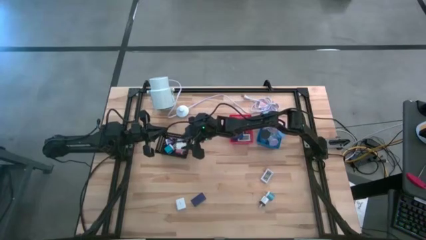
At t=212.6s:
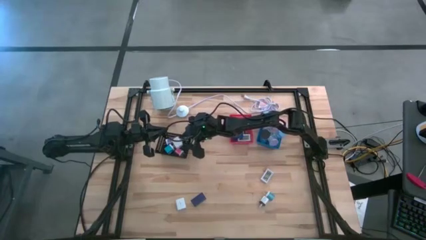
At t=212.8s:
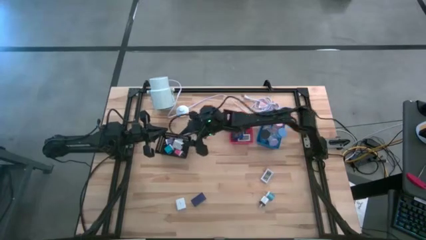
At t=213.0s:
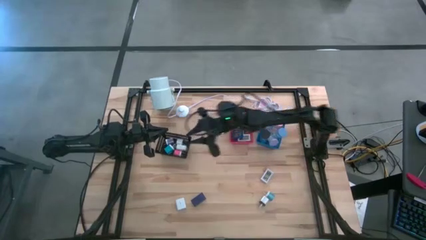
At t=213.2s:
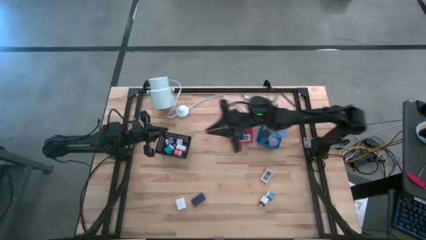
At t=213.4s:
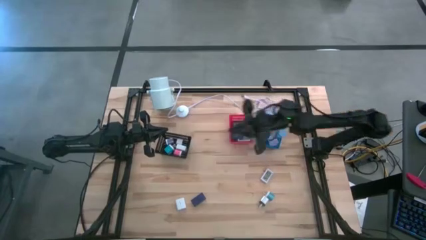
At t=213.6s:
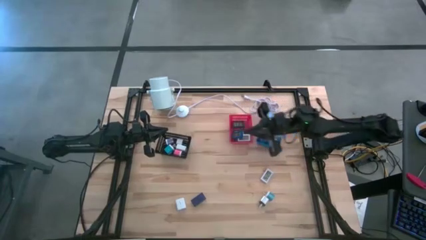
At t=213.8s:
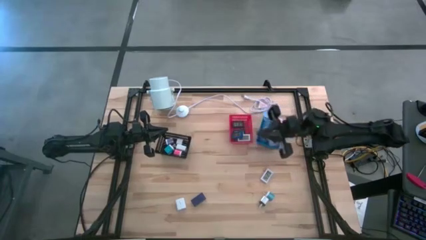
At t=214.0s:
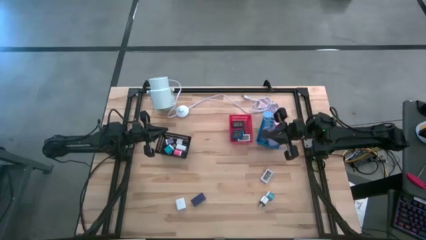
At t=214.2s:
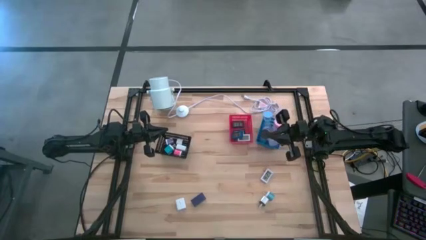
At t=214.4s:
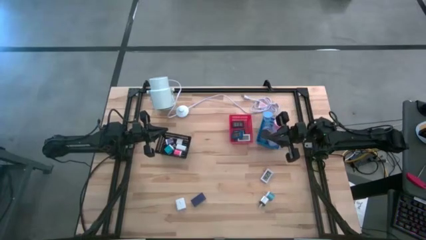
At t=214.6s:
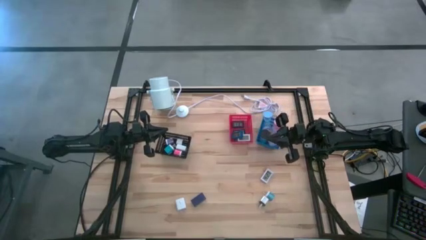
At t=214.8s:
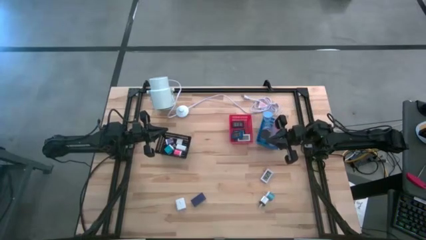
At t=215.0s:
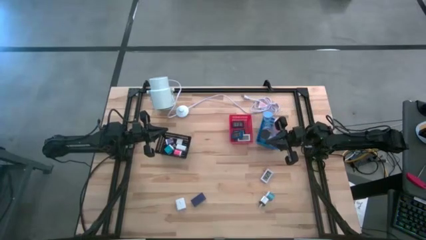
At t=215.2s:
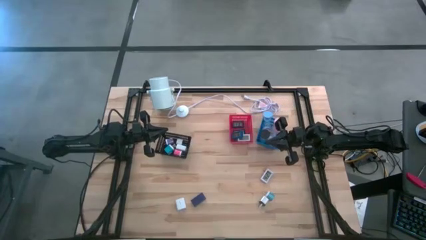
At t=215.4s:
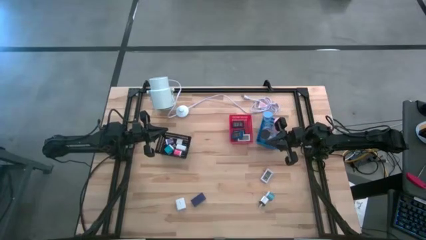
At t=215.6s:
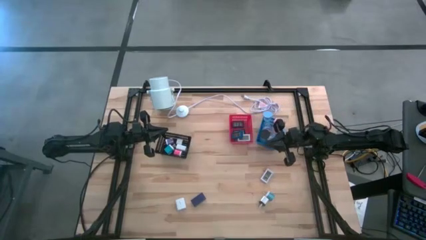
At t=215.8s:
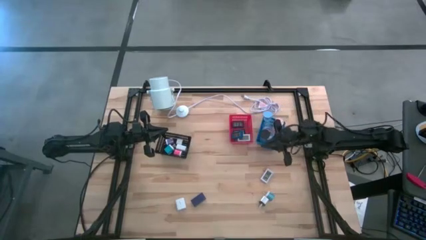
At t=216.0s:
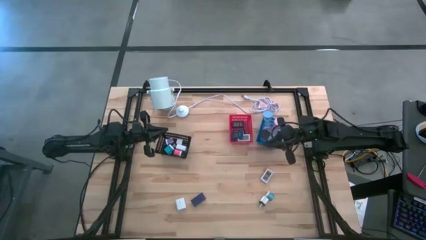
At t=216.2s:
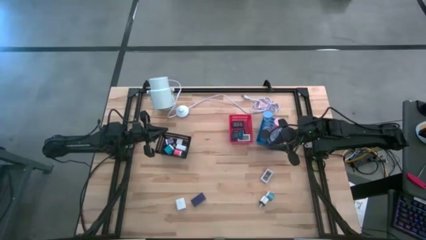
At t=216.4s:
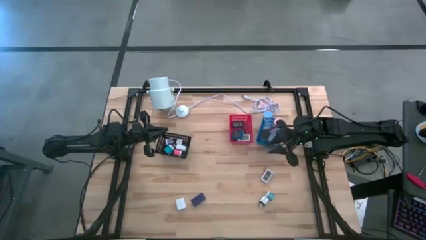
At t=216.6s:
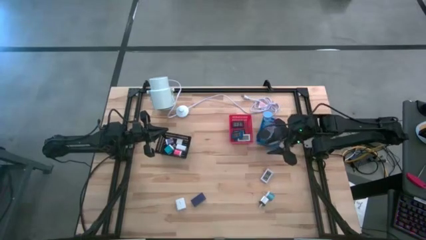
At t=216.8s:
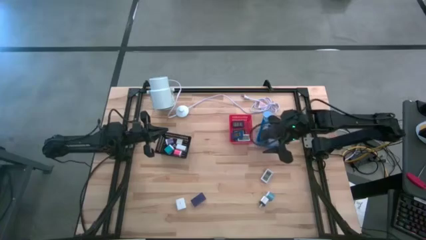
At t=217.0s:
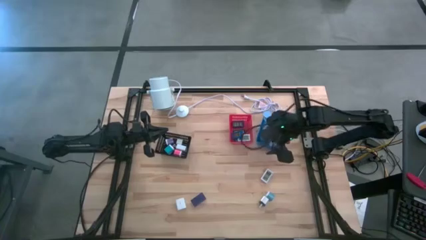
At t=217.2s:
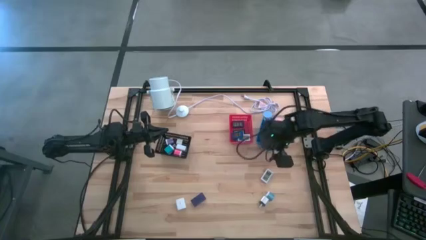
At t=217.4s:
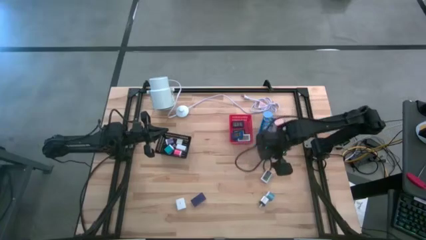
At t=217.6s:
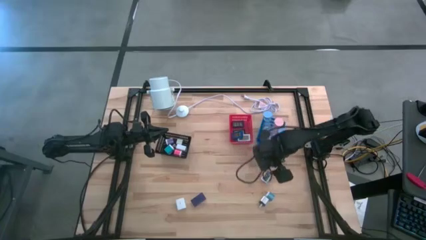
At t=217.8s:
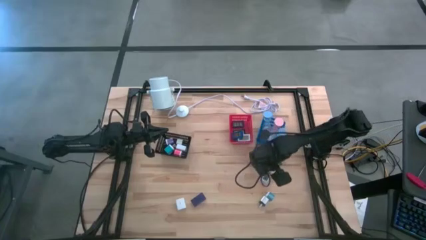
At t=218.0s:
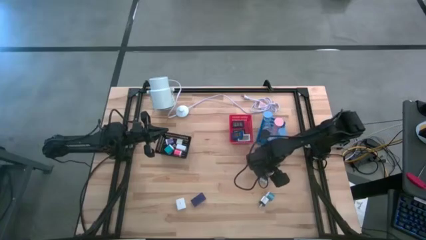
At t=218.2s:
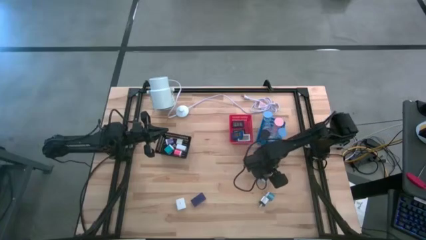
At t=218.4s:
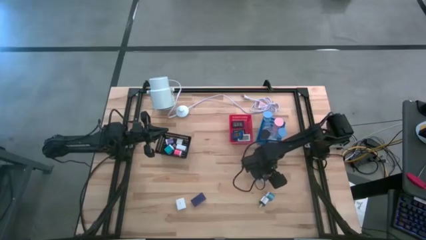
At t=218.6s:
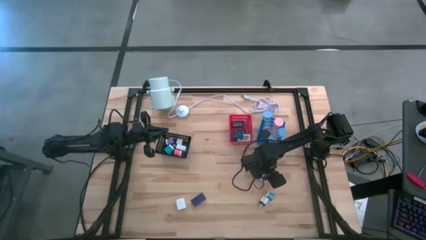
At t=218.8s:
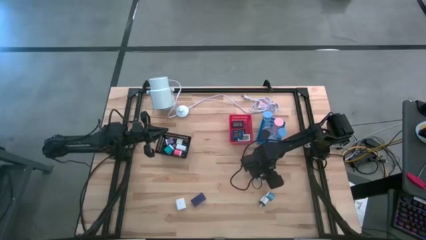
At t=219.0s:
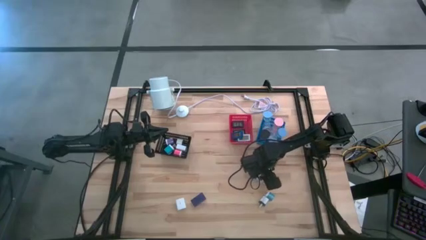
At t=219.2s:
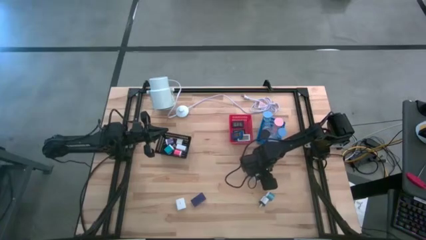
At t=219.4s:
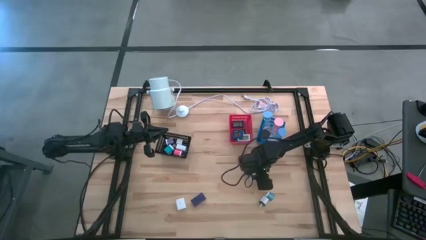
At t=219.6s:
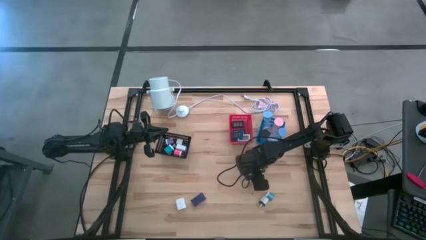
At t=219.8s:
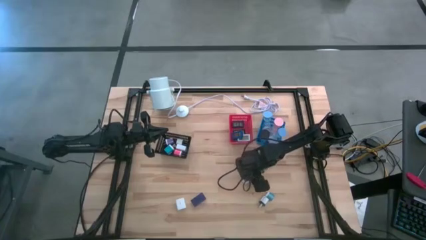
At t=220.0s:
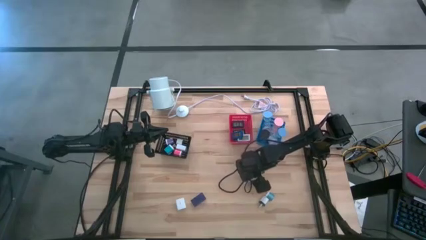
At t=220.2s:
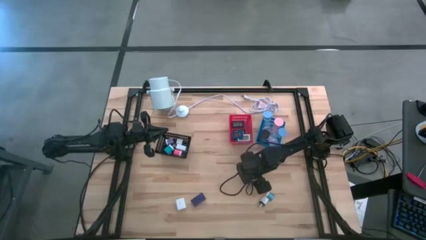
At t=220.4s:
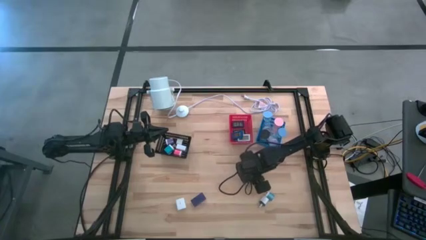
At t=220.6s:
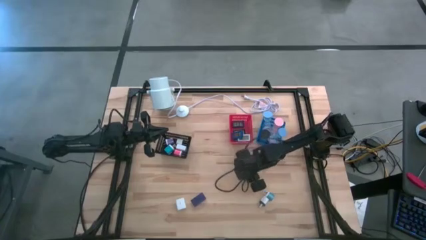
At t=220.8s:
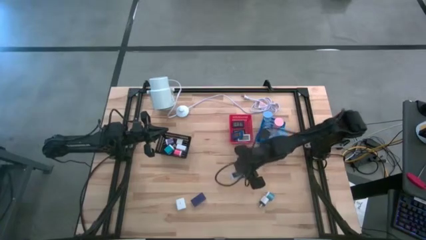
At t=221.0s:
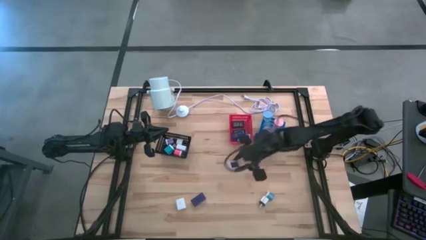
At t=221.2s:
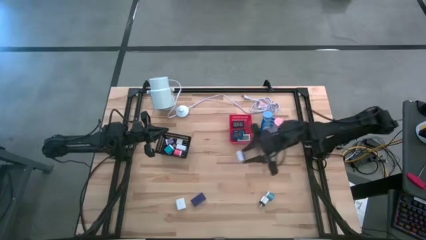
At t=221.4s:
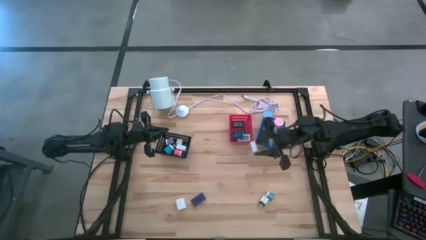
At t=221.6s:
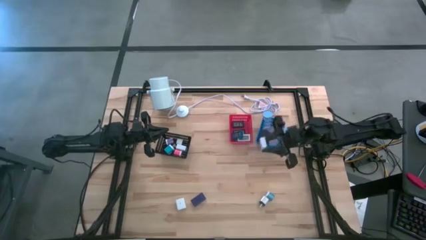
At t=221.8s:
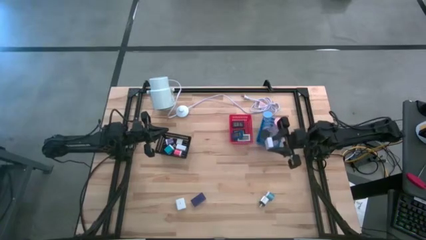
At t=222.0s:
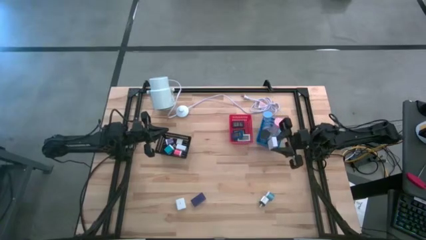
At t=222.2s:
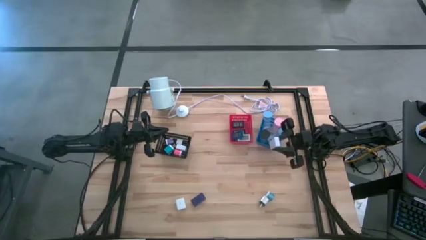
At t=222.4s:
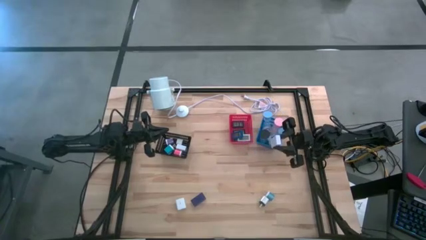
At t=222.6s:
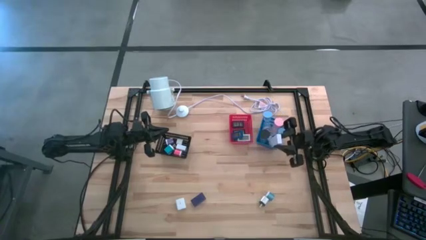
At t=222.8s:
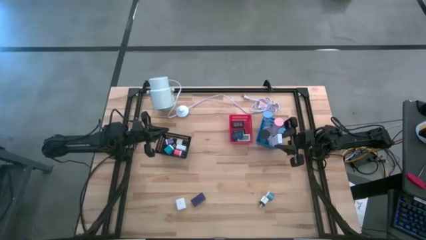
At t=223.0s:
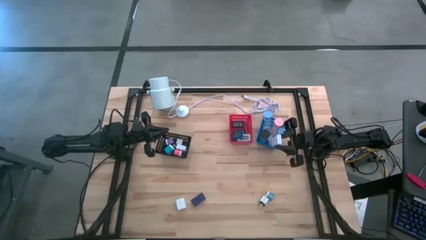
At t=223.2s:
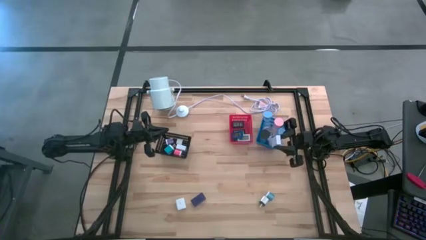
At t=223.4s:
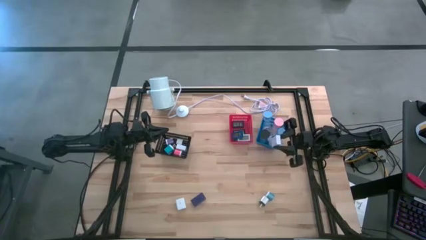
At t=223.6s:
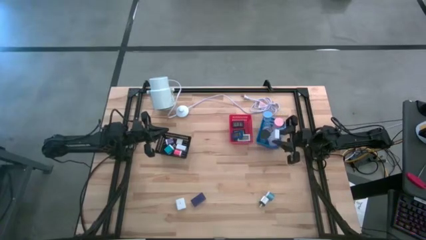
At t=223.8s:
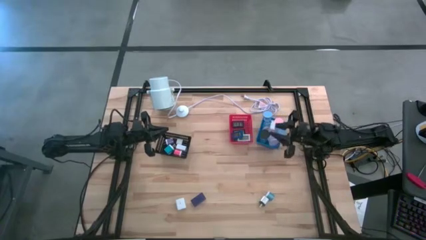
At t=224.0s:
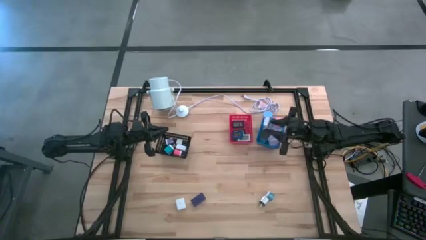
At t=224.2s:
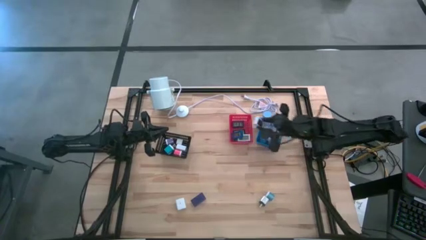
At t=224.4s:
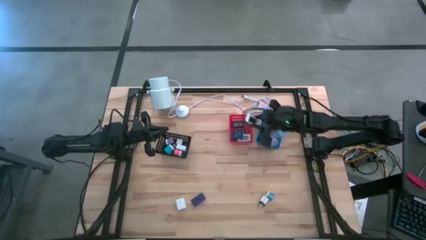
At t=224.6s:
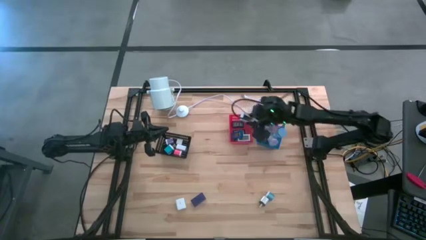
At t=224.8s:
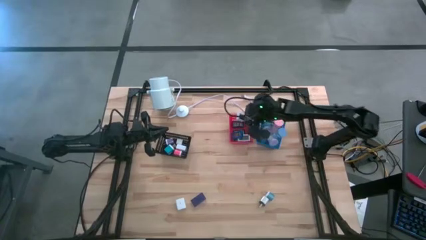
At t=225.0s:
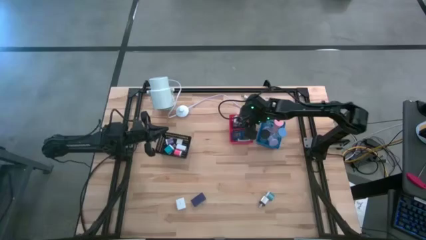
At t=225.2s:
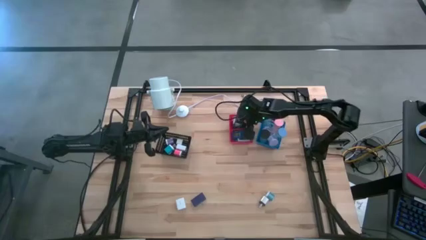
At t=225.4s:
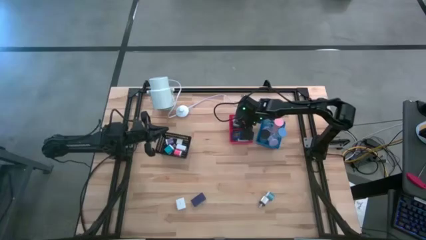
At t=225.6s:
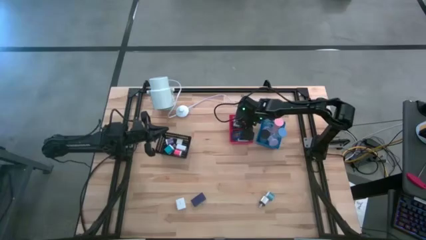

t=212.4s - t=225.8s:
Task: Pick & Place Office items
Put the white digital clock into the red bin

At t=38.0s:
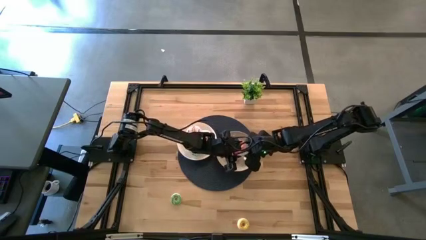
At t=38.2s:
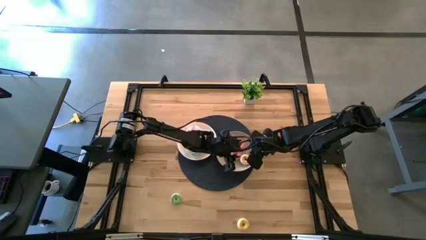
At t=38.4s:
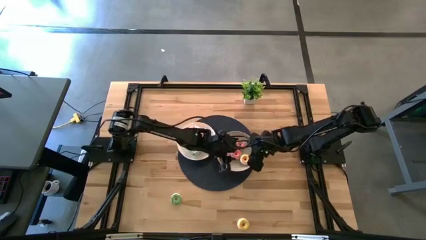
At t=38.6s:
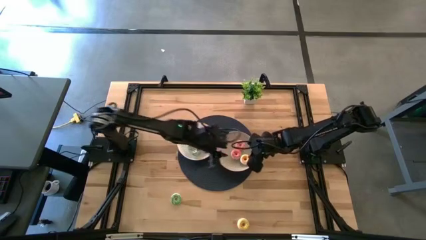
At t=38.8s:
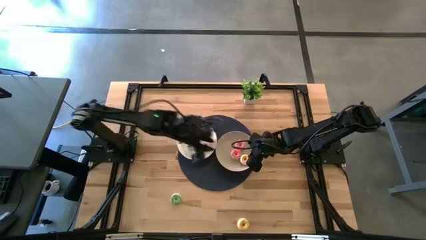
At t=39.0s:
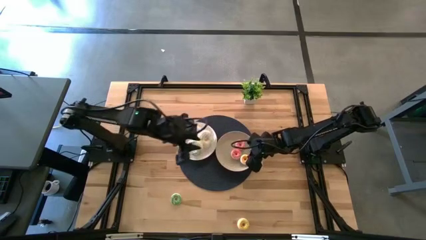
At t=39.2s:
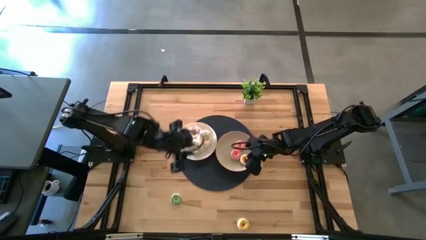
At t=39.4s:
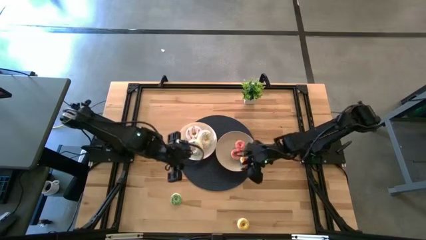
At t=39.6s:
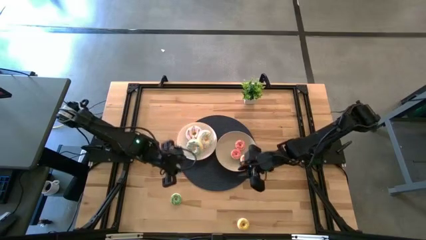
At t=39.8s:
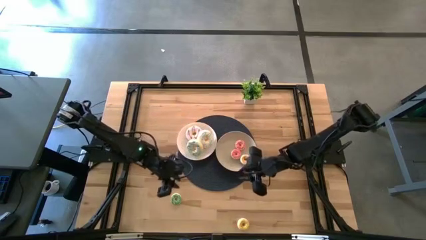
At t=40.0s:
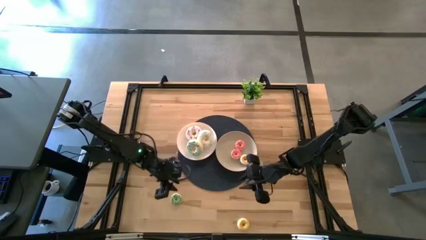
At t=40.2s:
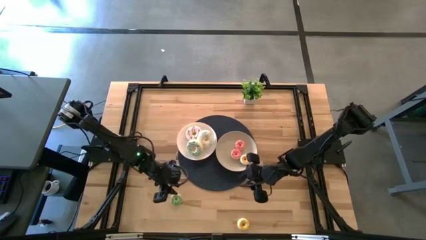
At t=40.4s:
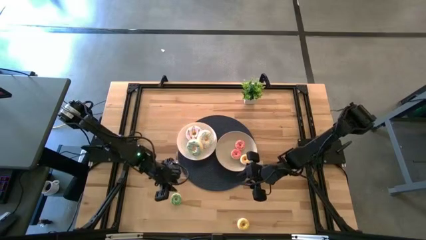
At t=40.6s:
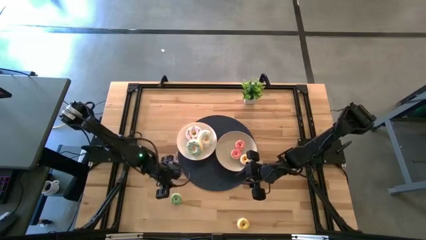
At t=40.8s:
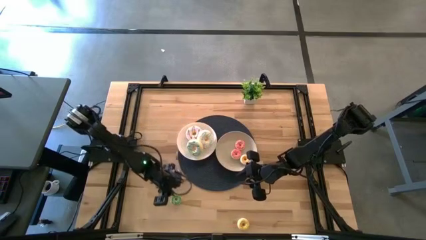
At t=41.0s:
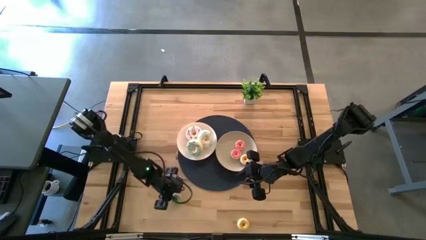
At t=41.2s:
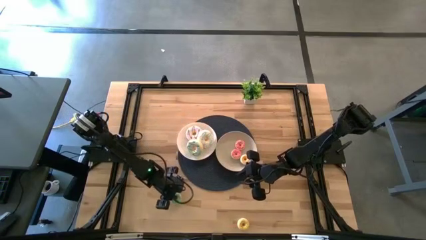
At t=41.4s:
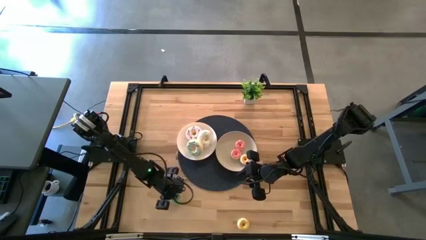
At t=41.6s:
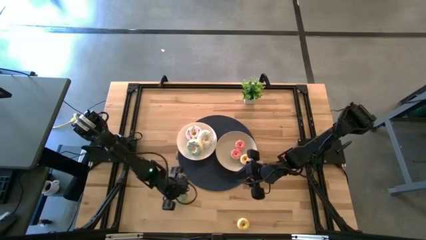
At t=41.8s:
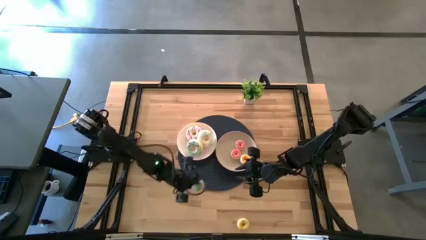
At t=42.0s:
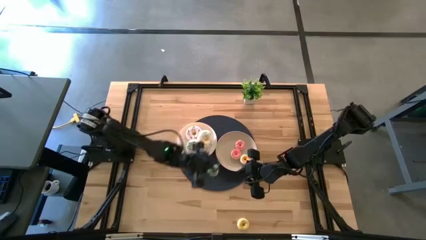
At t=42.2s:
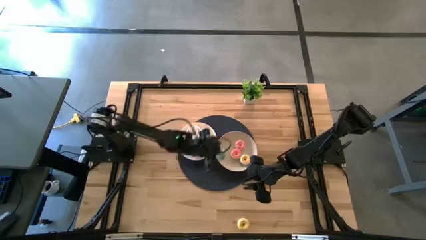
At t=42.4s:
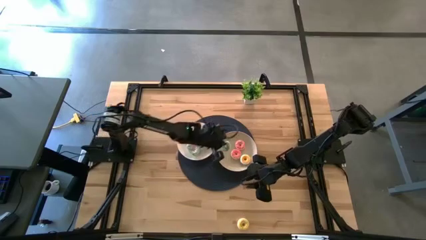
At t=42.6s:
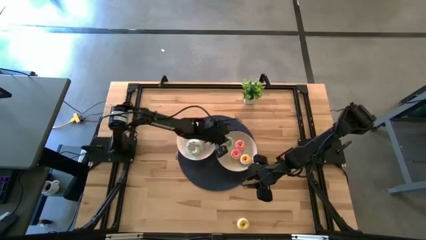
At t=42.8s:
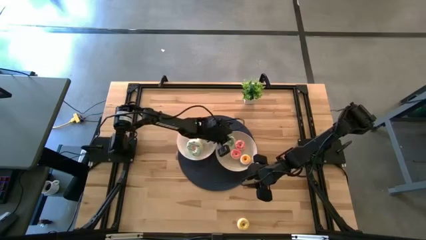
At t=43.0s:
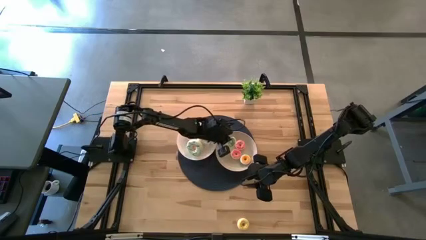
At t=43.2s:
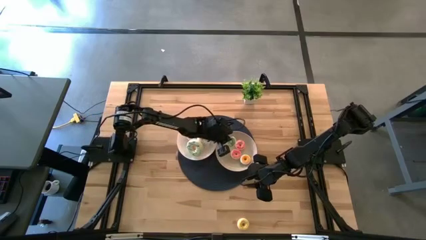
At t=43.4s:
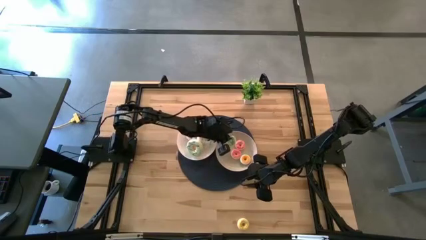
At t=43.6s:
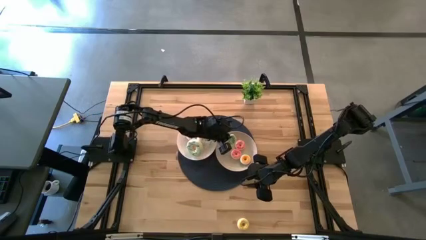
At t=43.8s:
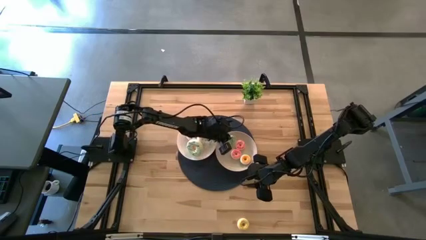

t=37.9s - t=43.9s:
Task: Pick & Place donuts
Put the small green donut on the light brown plate
